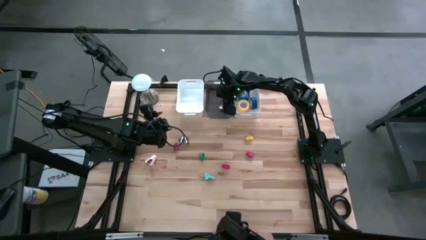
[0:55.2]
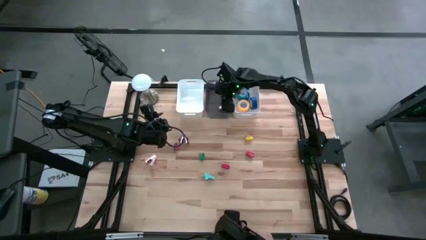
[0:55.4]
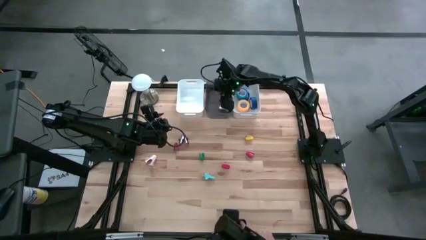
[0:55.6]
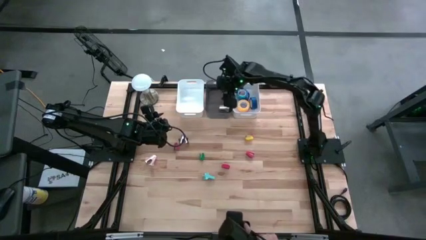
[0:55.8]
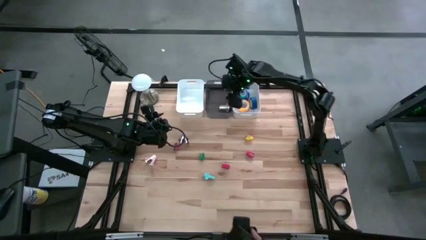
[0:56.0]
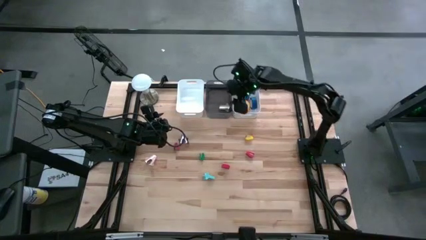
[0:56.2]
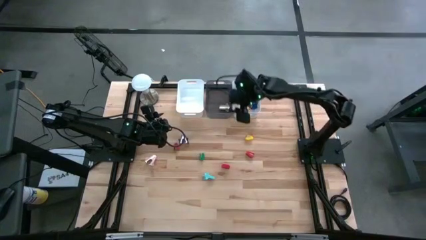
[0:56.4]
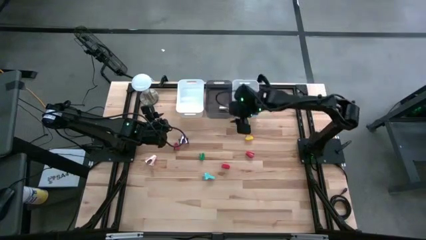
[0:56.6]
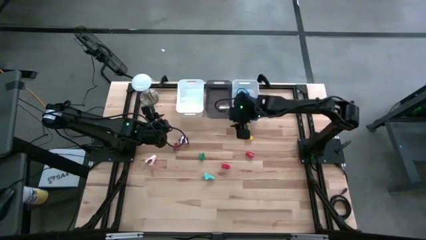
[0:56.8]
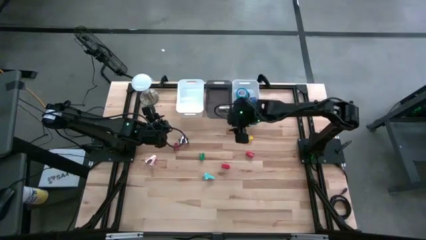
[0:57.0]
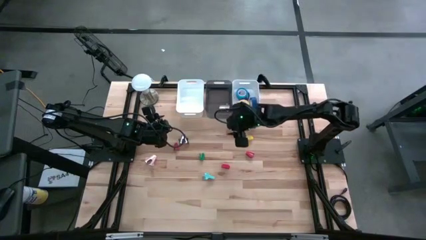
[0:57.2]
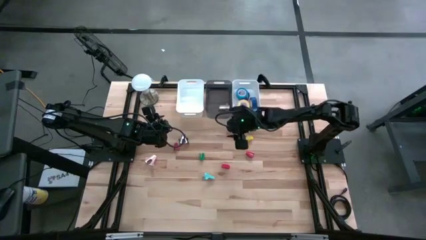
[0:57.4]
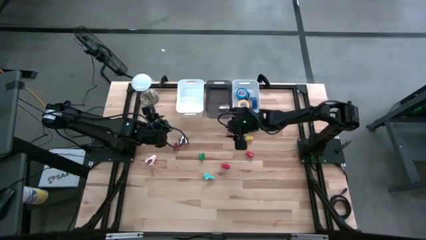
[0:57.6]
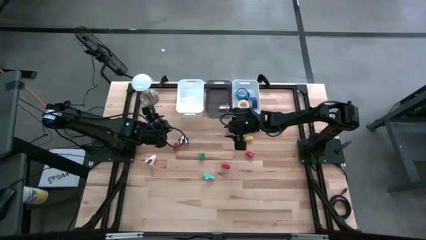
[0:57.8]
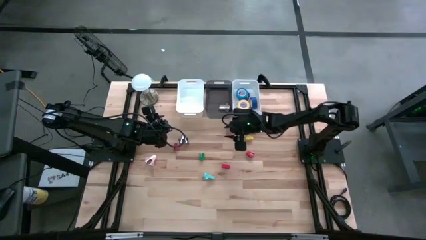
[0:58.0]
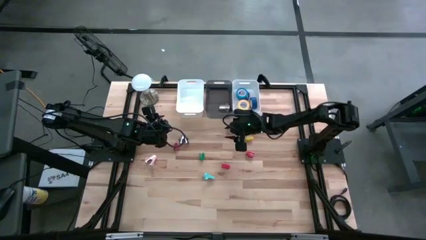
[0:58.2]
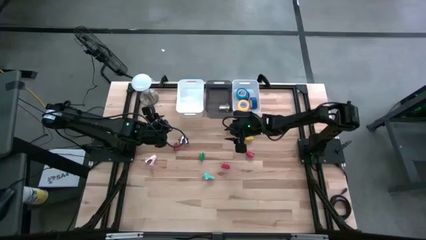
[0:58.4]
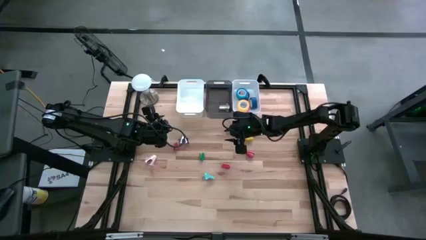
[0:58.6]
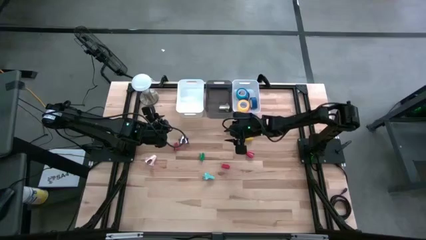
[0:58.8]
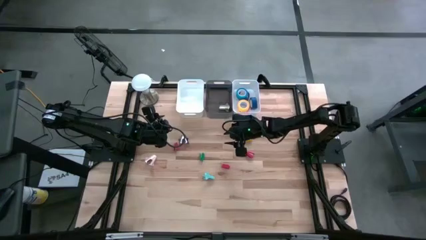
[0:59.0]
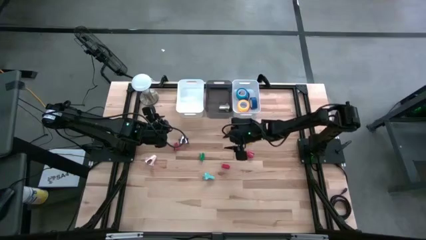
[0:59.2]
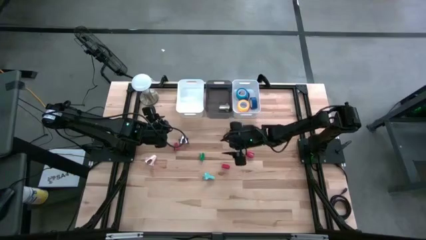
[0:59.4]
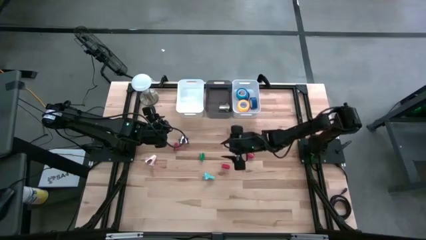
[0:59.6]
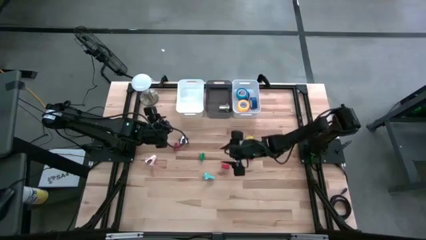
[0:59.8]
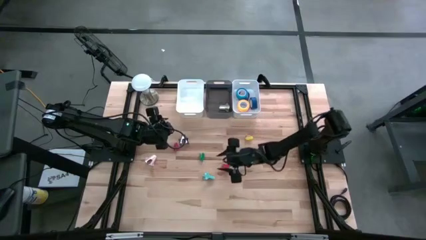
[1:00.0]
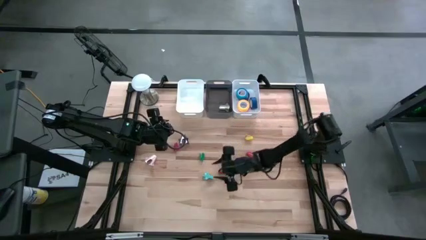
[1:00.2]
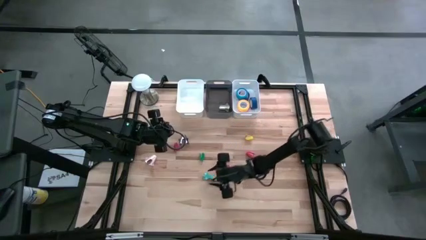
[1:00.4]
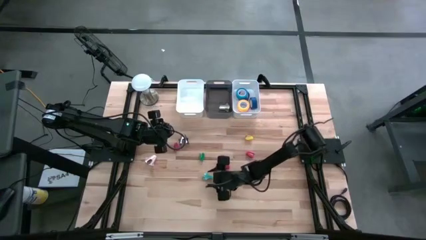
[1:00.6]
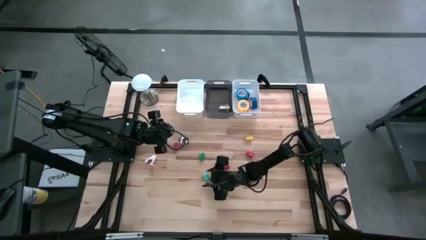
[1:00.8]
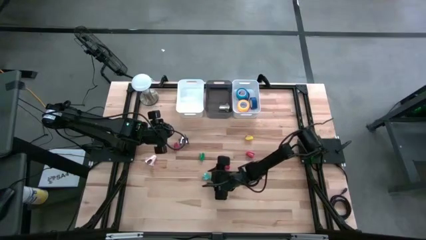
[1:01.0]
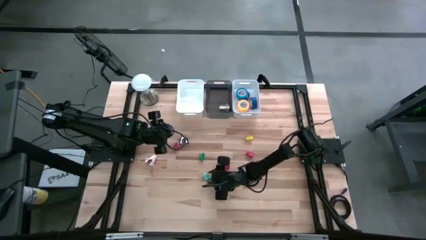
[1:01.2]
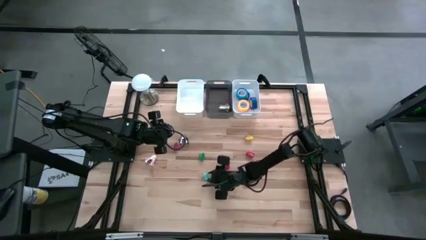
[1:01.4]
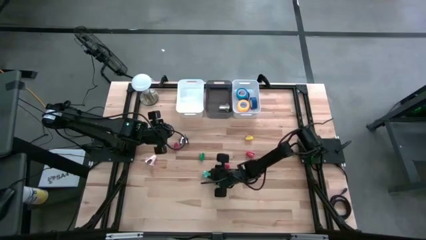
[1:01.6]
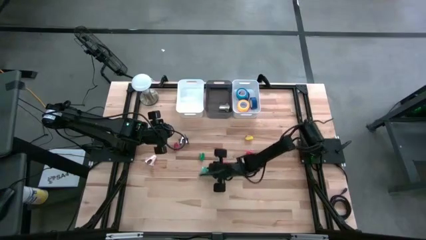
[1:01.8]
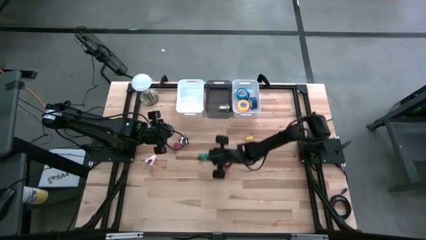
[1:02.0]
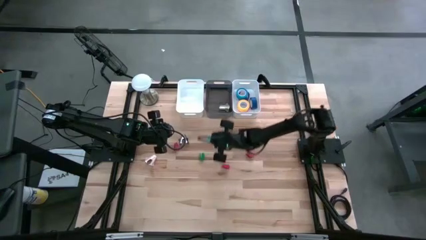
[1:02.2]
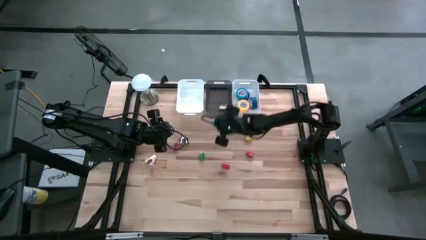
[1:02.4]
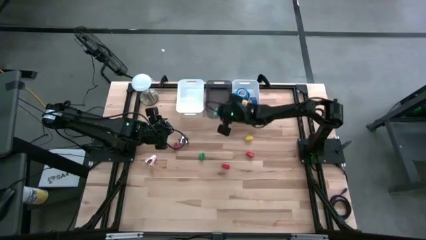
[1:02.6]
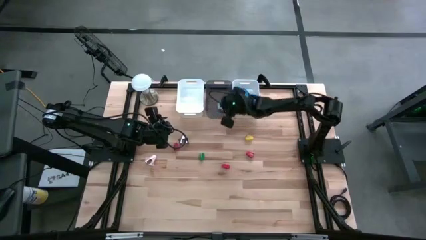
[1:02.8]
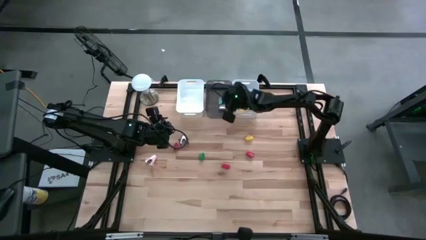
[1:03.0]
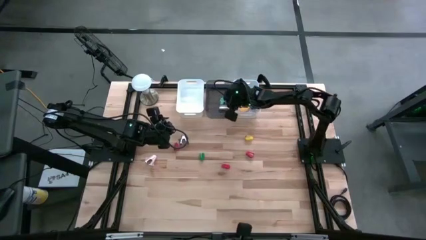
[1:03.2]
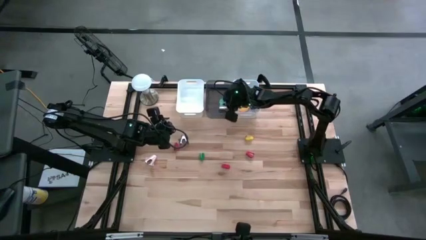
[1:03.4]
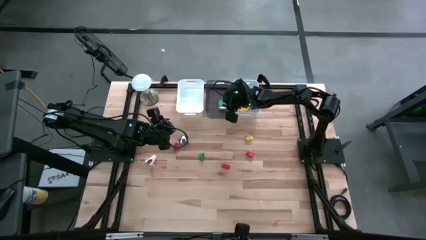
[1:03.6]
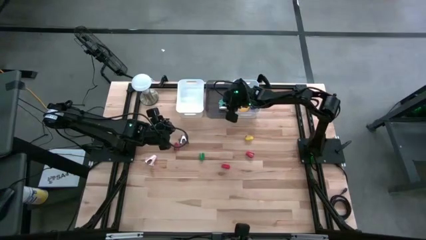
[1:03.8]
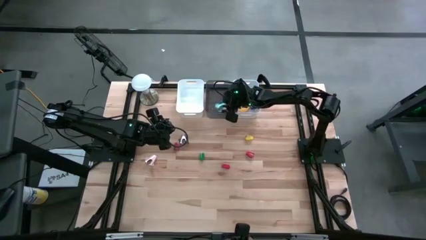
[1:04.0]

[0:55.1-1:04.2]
Task: Pick and place Stapler, Stapler remover, tape
Put the purple staple remover into the black bin

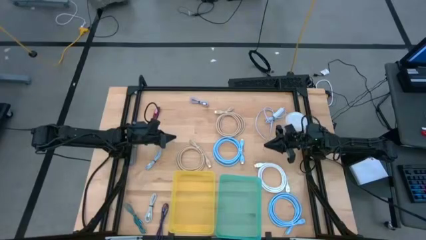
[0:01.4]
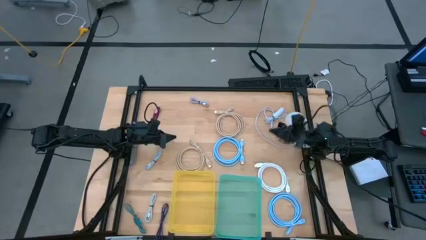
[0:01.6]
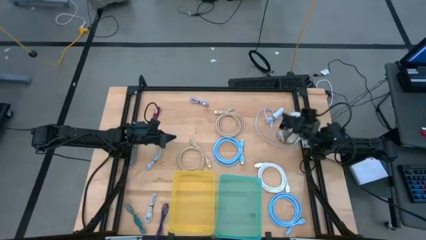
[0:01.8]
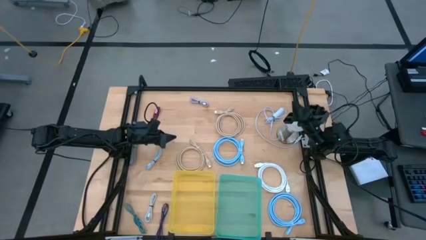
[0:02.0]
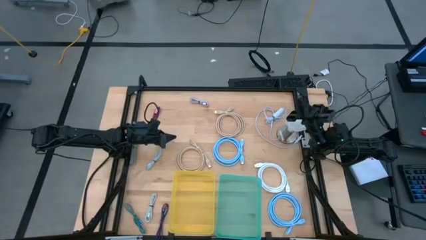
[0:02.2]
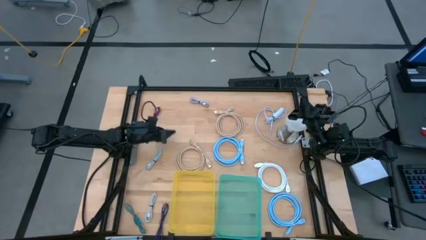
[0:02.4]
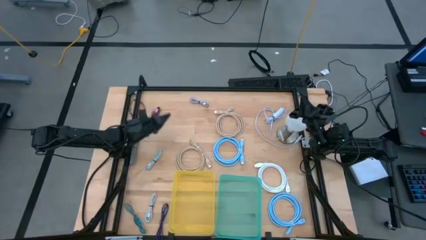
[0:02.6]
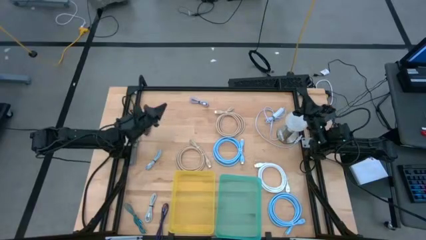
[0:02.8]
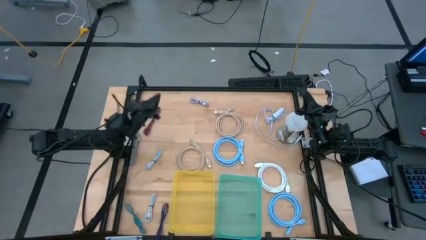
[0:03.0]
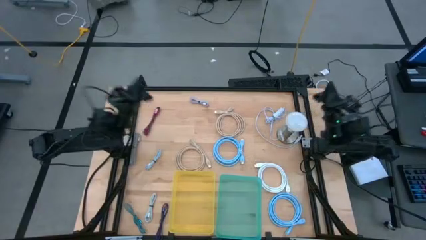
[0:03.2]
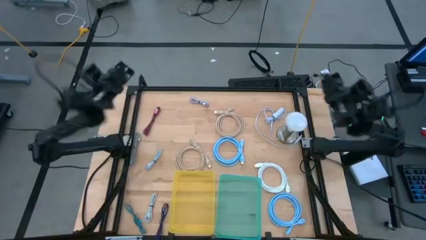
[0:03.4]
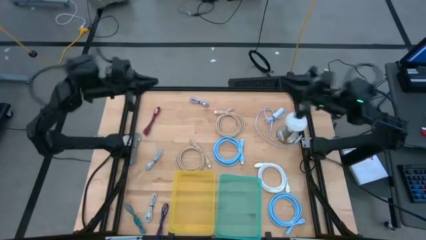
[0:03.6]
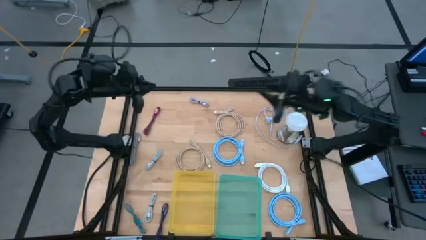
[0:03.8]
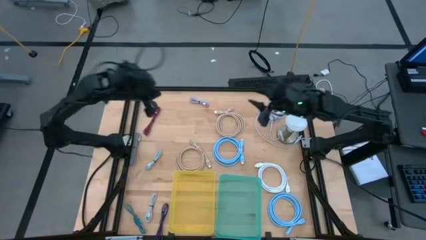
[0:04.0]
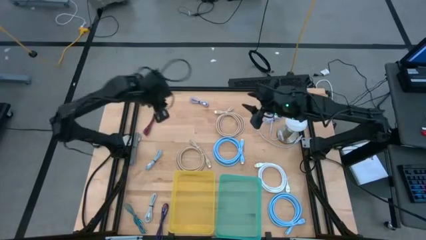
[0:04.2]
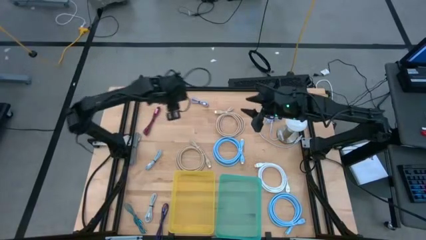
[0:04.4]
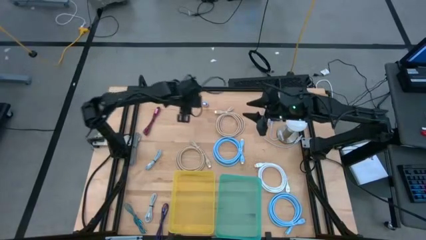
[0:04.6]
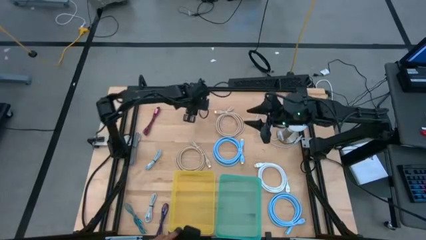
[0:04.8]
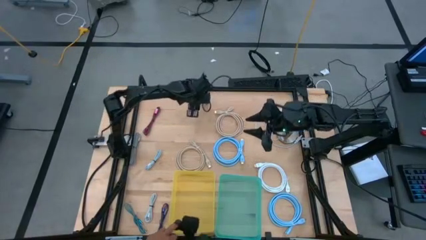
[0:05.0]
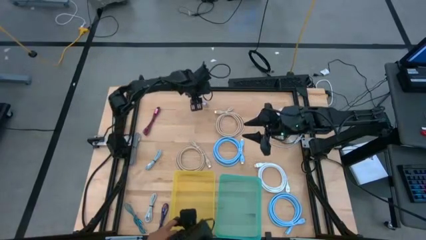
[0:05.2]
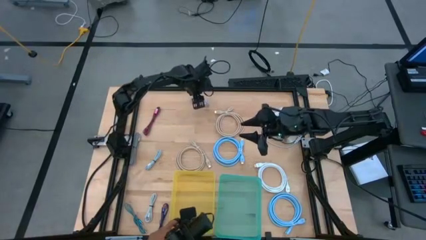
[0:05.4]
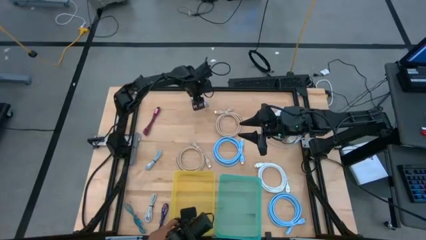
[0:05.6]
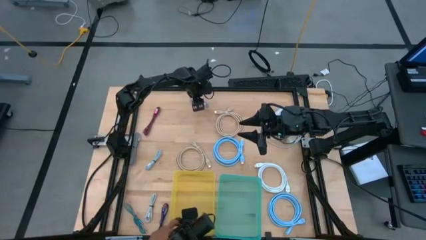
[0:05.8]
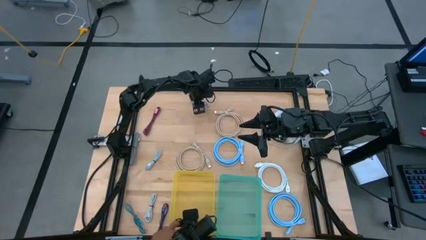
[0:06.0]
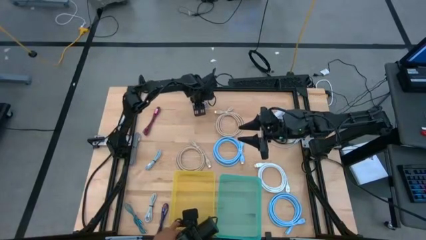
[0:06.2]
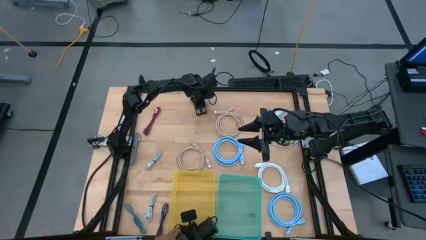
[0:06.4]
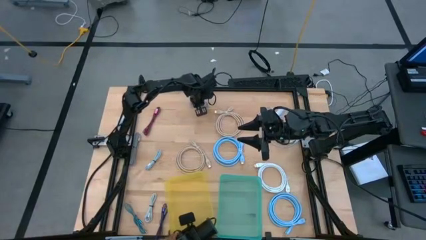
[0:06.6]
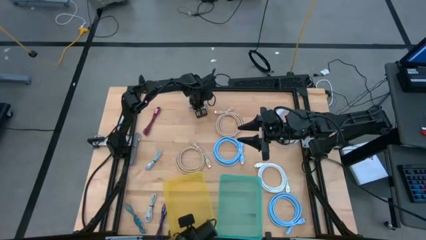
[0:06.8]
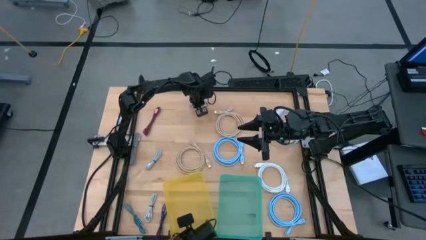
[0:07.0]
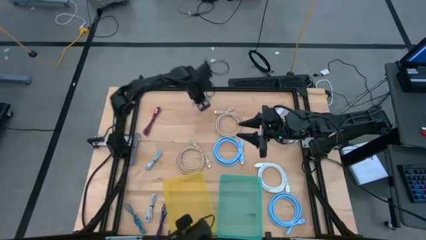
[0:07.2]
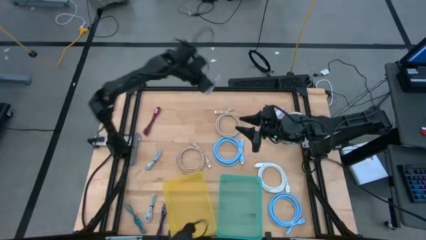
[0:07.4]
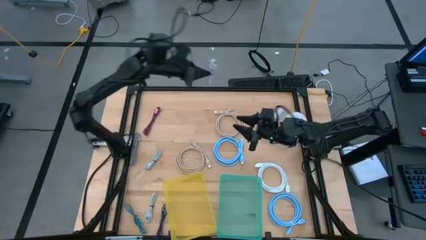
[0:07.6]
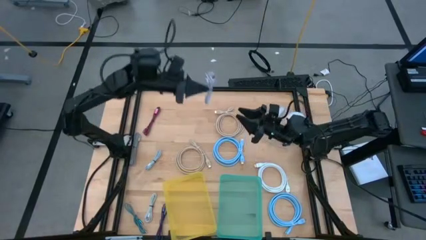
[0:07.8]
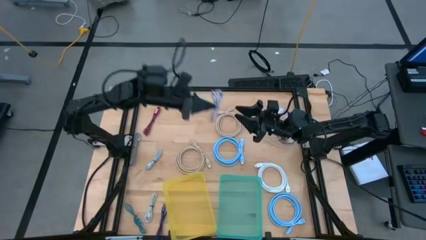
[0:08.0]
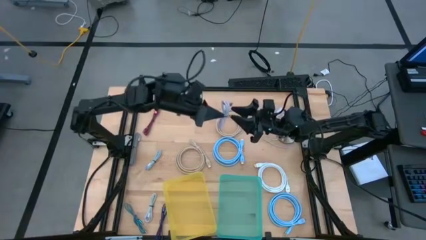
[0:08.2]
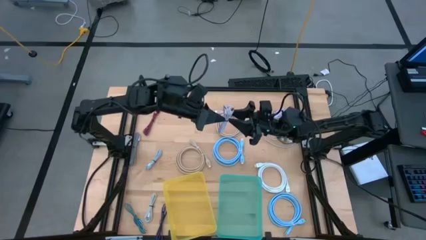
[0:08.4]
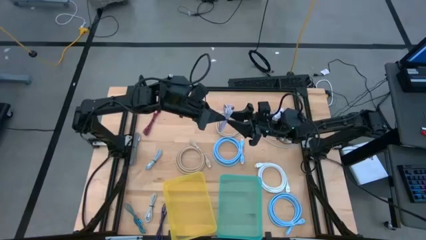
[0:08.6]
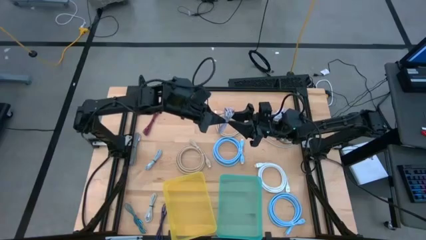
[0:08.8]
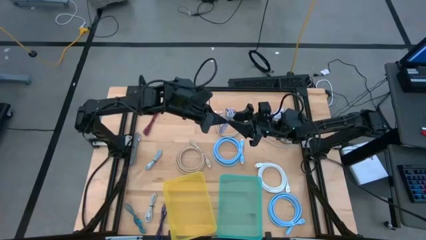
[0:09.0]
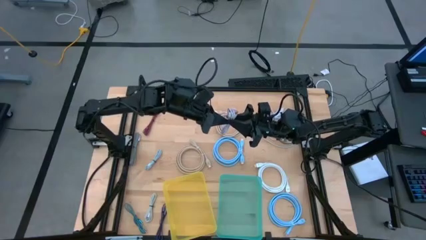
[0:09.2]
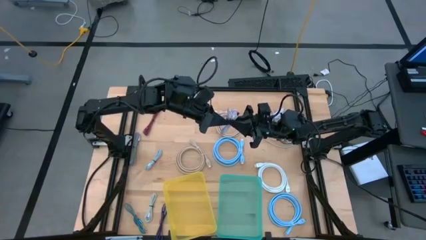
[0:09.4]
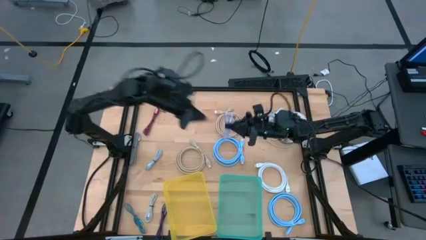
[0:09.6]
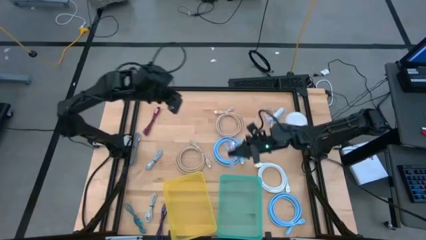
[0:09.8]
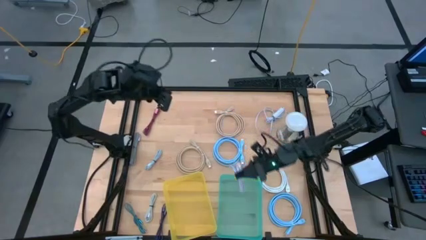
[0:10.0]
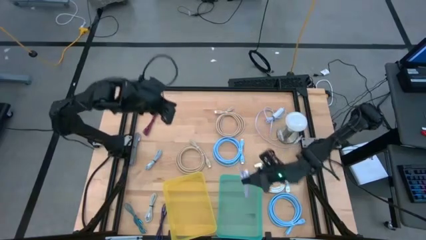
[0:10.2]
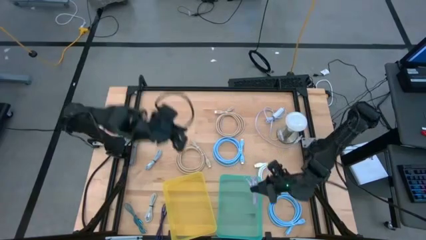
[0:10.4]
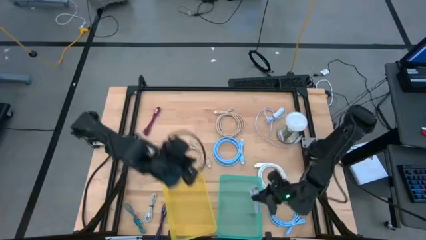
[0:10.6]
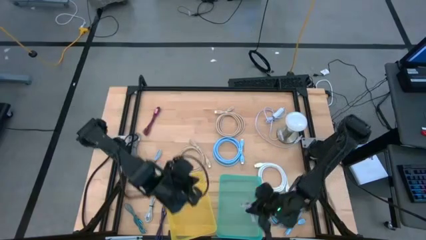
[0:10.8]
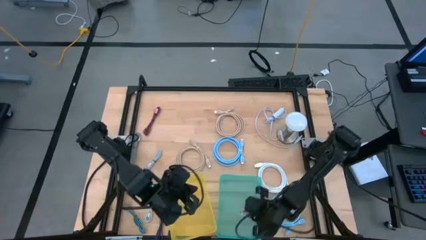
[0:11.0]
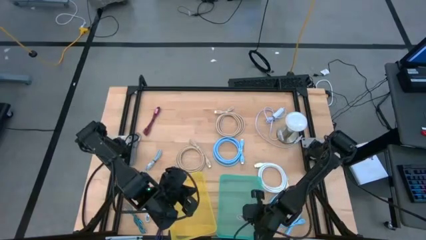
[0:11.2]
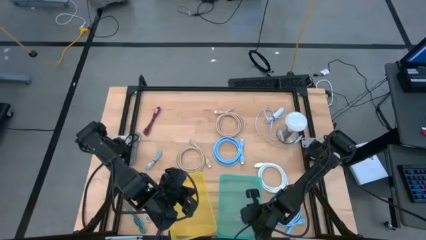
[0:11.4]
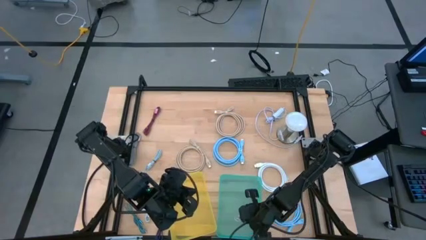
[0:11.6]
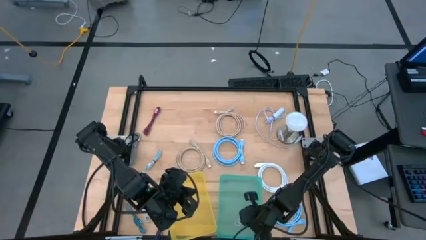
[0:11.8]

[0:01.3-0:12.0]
Task: Pick & Place USB Port
Put the small gray charger cable into the green bin
